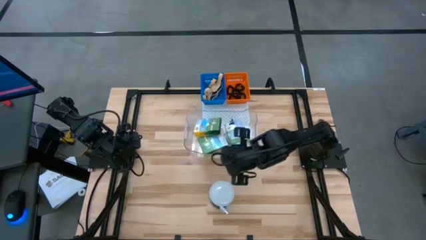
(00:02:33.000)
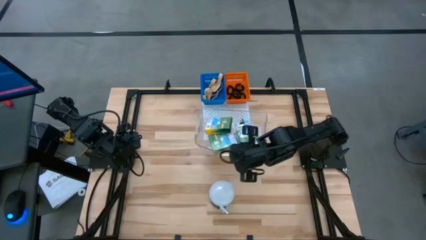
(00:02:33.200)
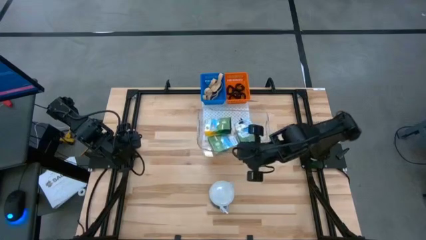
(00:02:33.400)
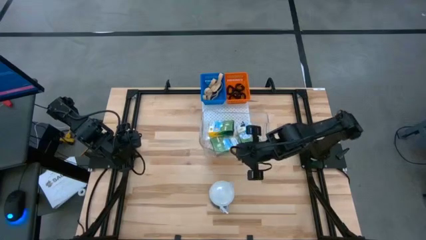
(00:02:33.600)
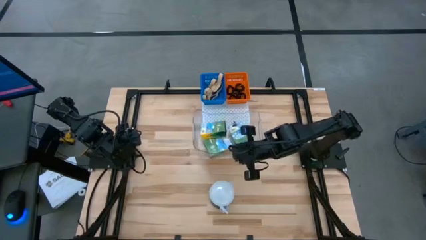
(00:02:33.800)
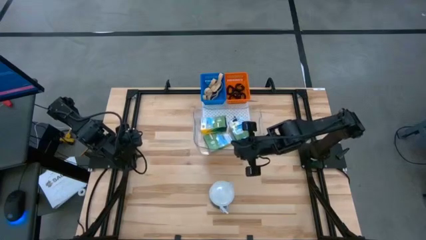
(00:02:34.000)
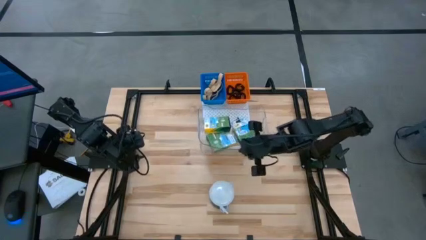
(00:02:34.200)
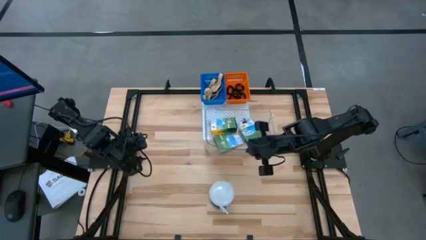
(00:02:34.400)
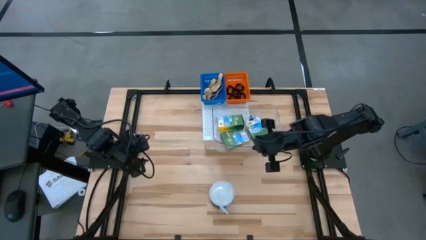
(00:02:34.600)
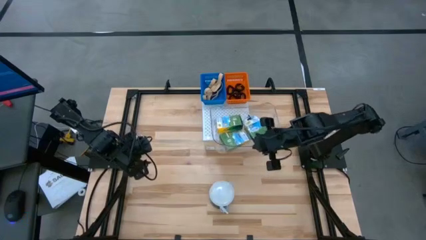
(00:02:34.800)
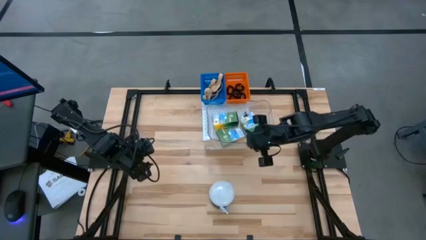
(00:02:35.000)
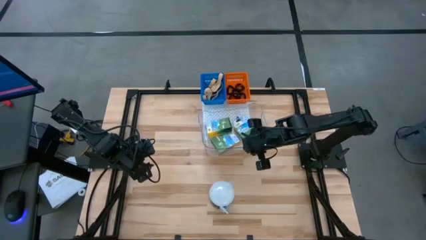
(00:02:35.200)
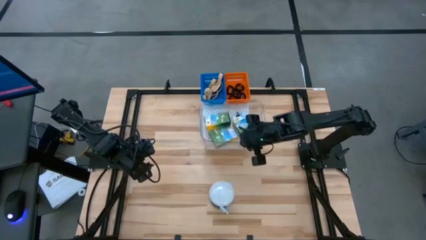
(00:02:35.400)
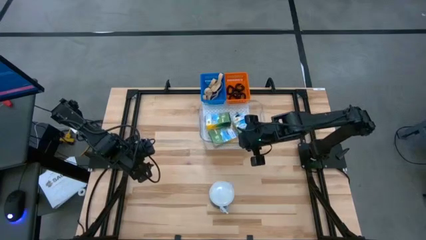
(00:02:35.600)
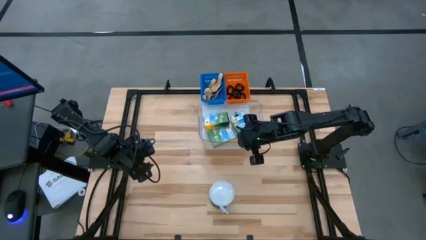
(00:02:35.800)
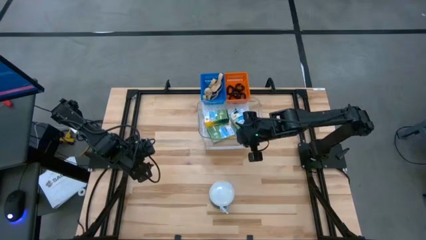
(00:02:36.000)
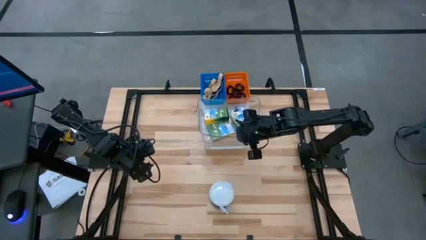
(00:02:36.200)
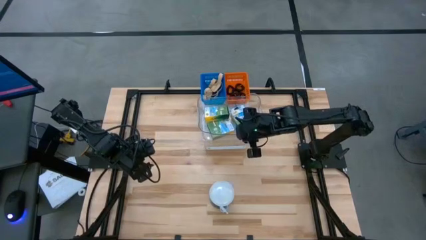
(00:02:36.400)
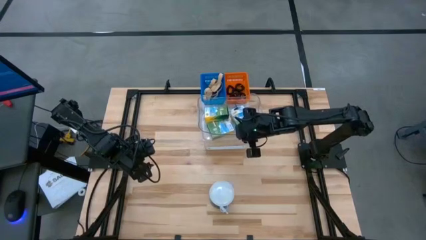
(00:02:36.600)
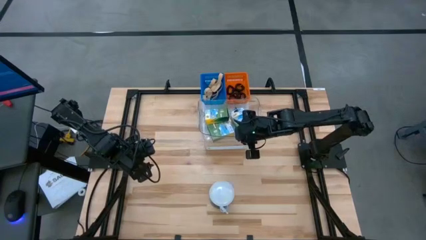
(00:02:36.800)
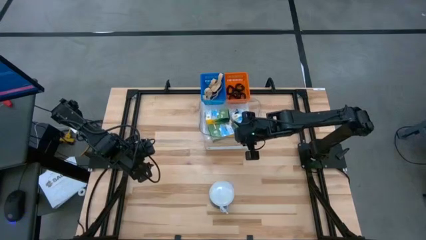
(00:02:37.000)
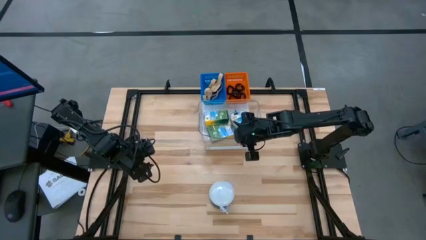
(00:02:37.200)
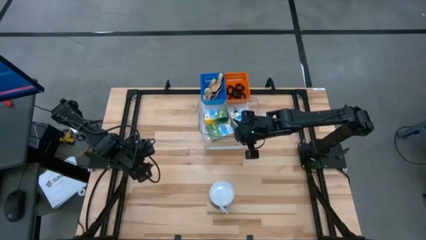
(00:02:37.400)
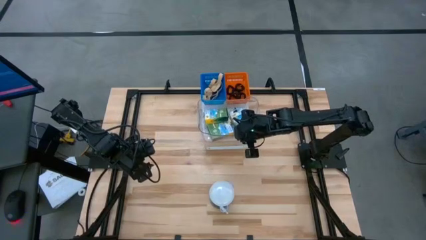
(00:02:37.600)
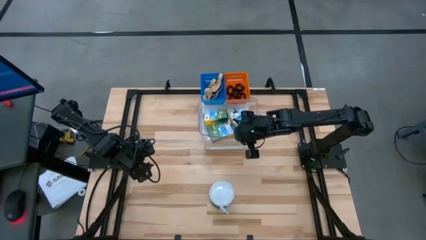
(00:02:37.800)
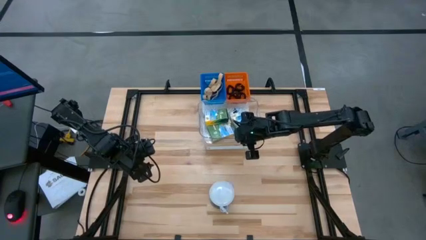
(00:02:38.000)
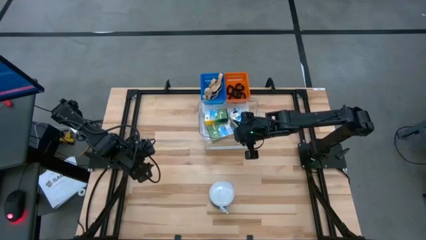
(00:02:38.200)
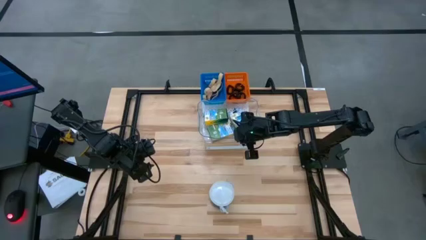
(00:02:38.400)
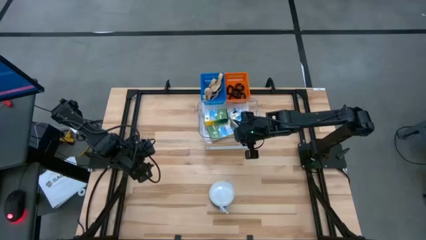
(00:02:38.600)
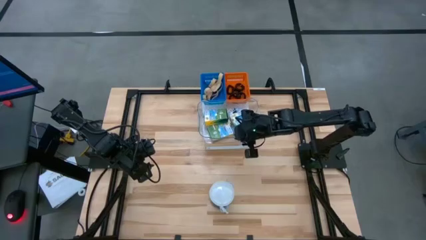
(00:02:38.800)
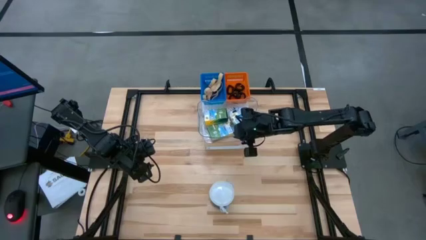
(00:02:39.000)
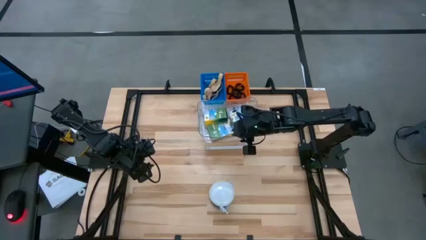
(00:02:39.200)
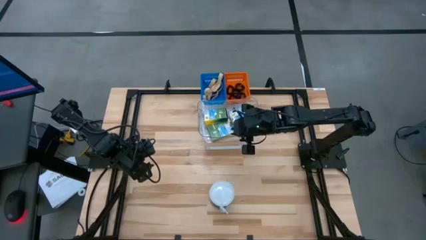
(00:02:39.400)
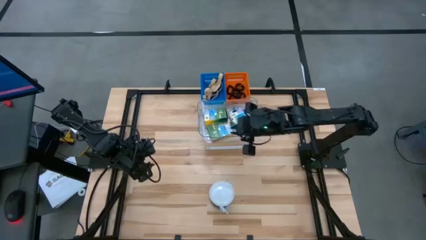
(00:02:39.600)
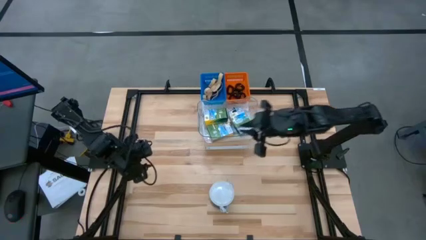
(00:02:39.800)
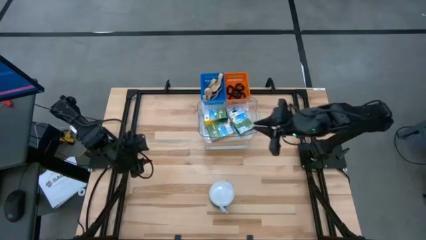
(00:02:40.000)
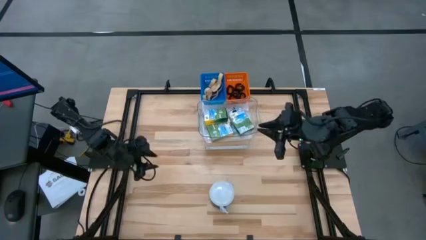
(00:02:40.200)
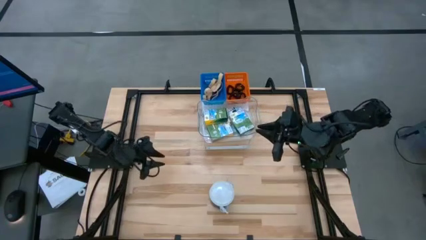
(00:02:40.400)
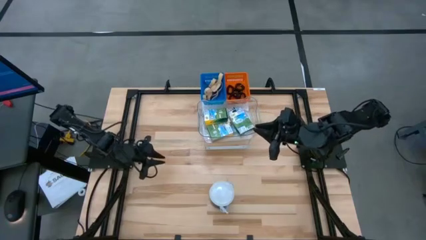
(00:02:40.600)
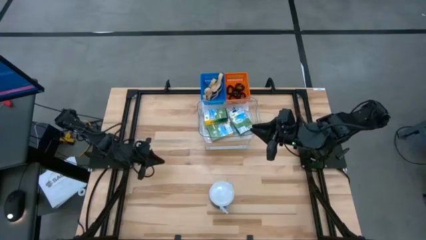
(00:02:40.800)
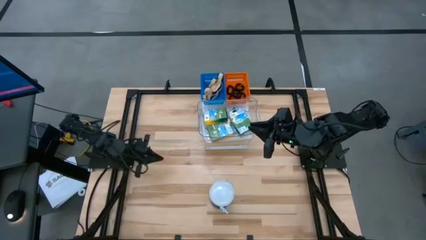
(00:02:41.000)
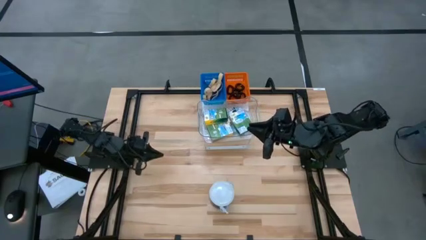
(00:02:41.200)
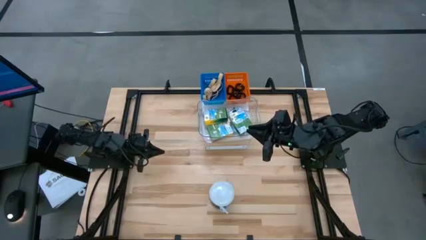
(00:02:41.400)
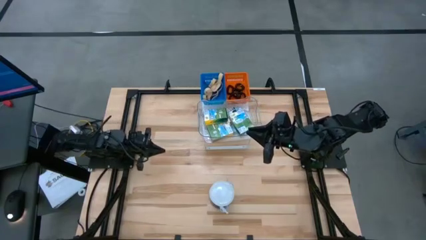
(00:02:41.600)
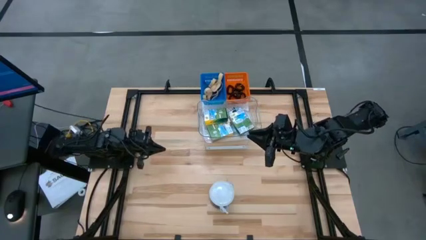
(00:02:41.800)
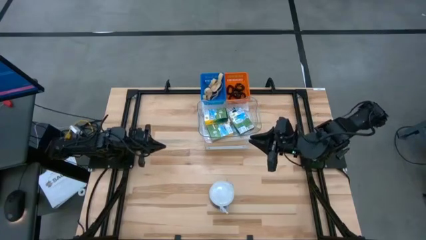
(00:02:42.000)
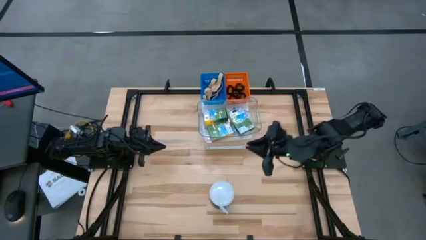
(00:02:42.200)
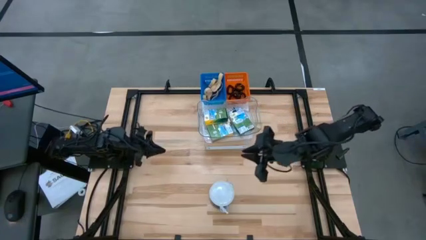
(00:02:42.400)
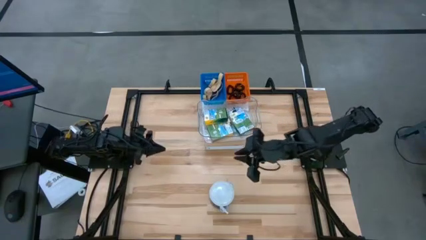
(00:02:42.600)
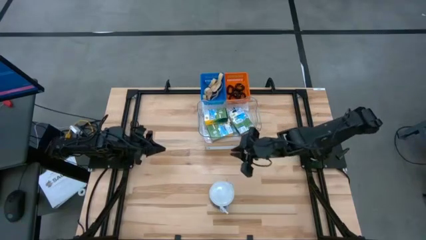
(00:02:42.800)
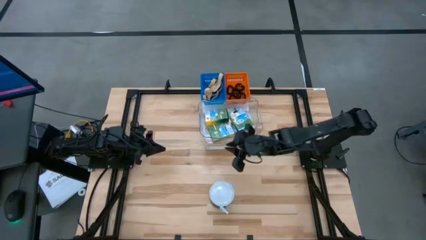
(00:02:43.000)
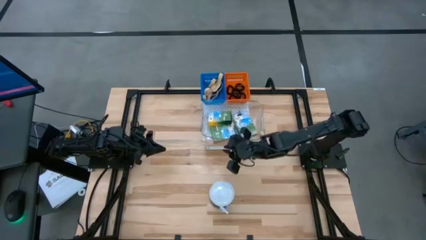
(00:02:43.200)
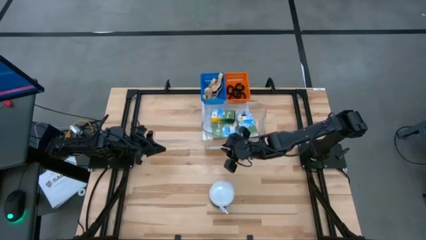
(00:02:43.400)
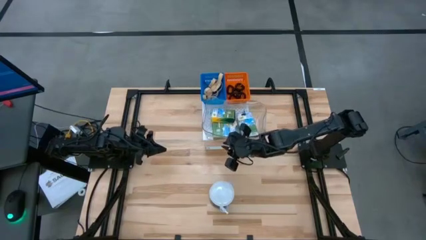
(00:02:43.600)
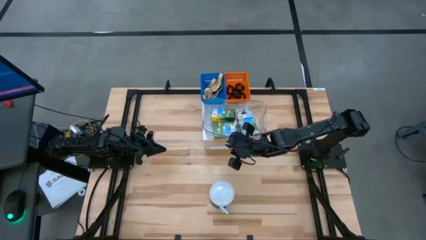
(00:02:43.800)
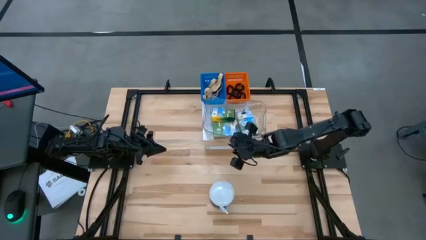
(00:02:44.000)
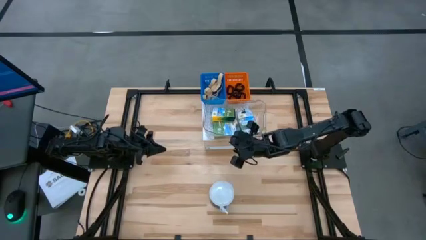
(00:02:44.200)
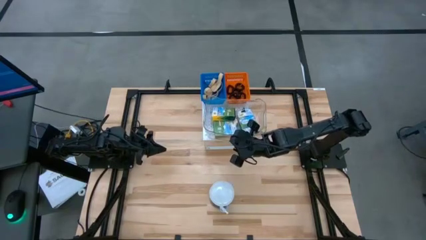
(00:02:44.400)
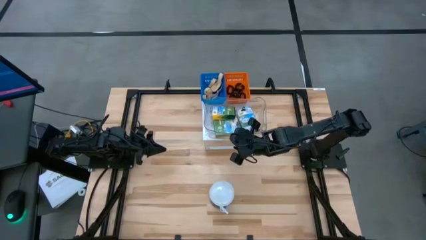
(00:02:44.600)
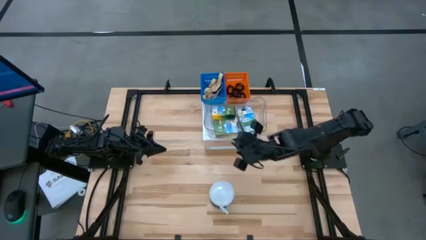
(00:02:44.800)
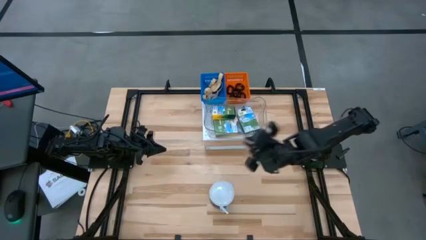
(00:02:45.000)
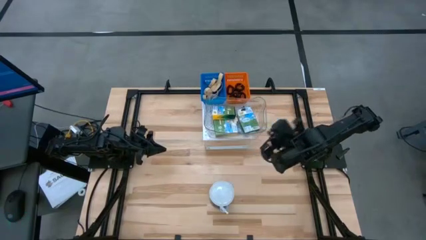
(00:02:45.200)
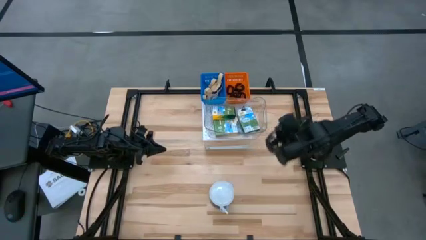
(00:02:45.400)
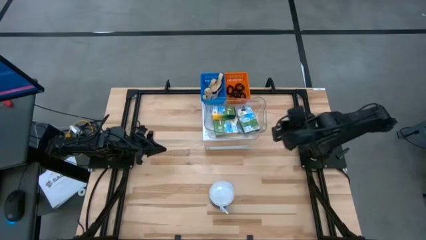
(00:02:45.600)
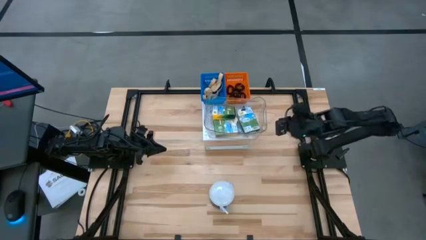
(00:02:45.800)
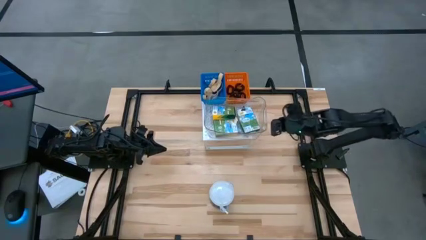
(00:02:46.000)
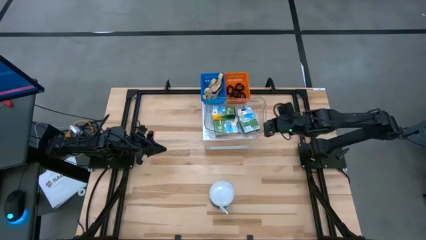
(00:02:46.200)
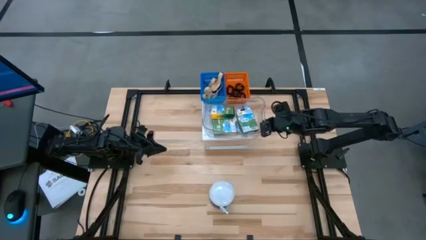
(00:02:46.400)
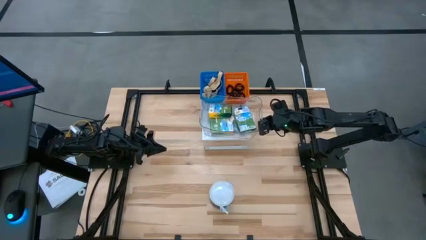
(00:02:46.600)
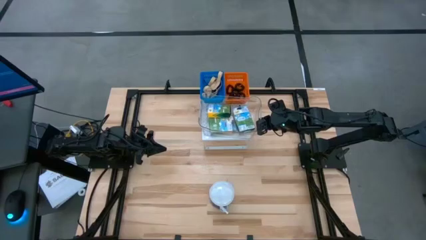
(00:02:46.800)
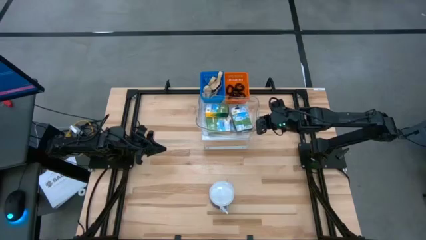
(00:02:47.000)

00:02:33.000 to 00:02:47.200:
Task: Pick & Place Office Desk Supplies
Put the transparent bin with crayon boxes on the shelf
